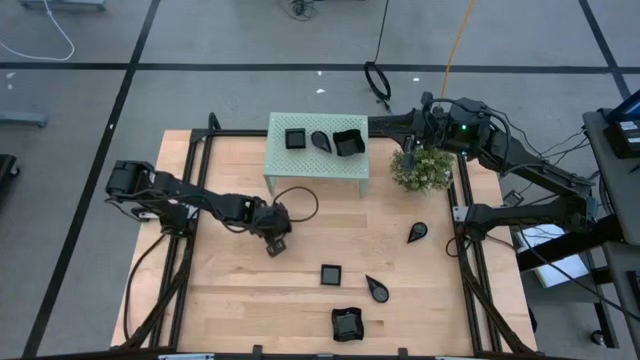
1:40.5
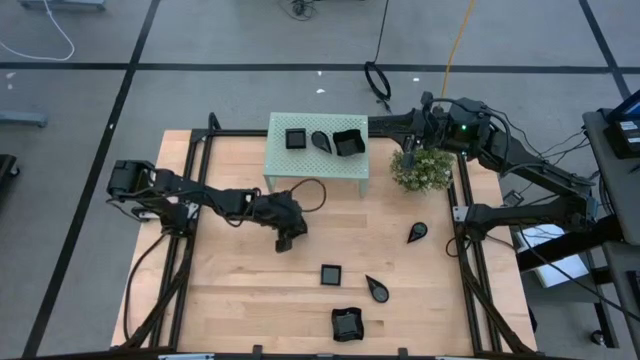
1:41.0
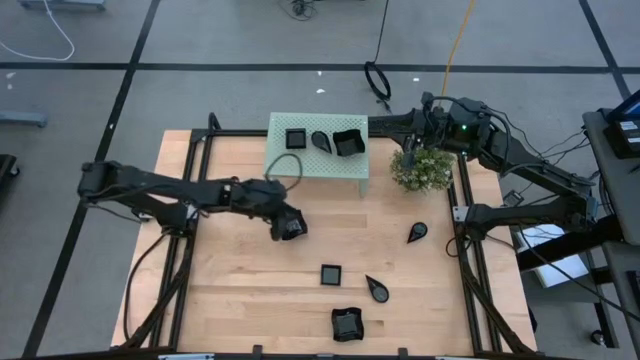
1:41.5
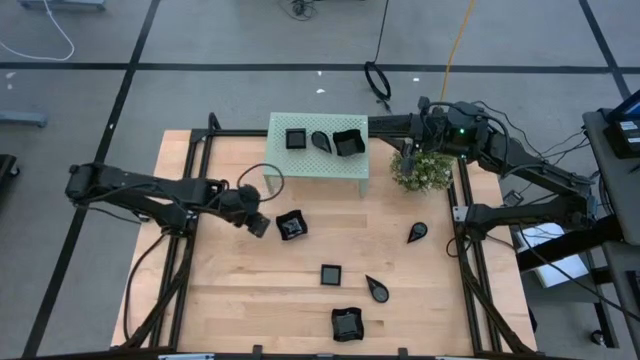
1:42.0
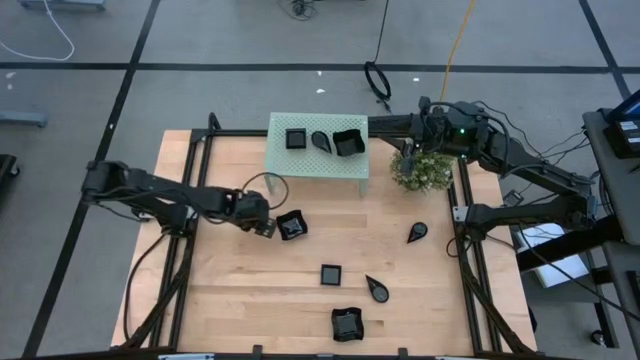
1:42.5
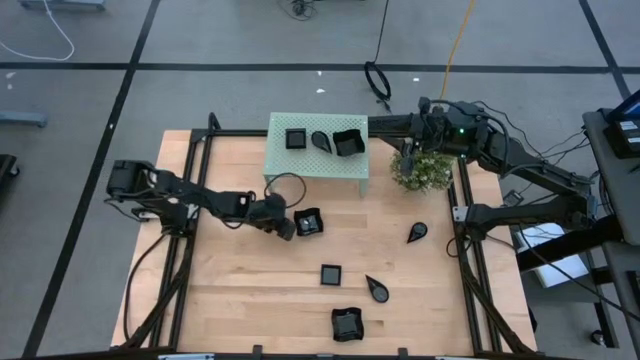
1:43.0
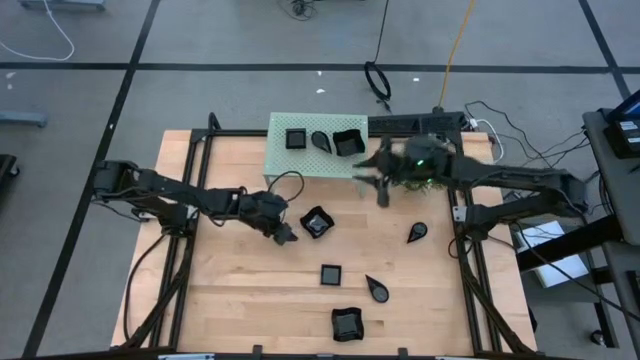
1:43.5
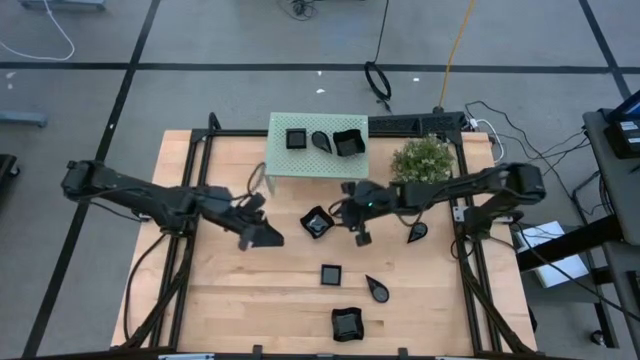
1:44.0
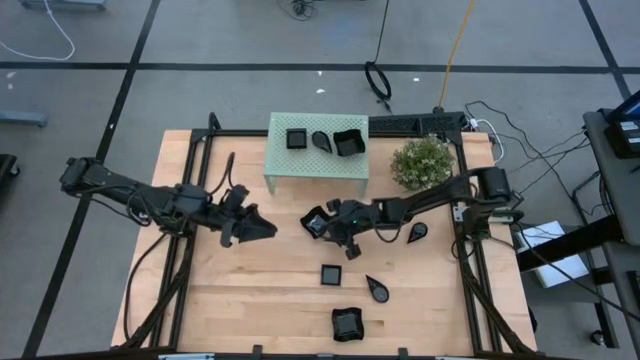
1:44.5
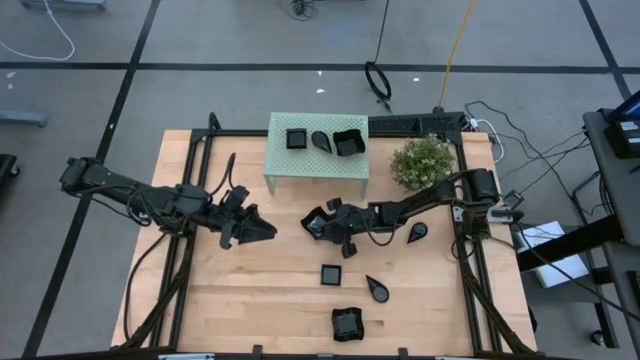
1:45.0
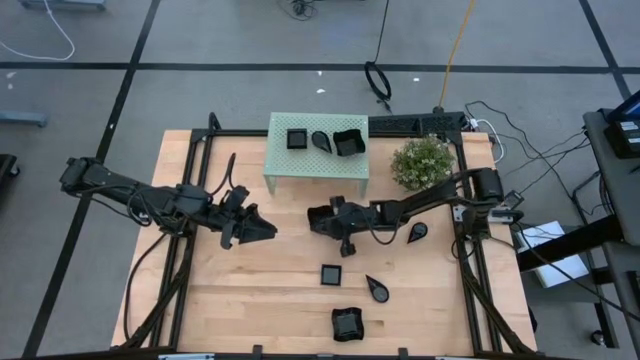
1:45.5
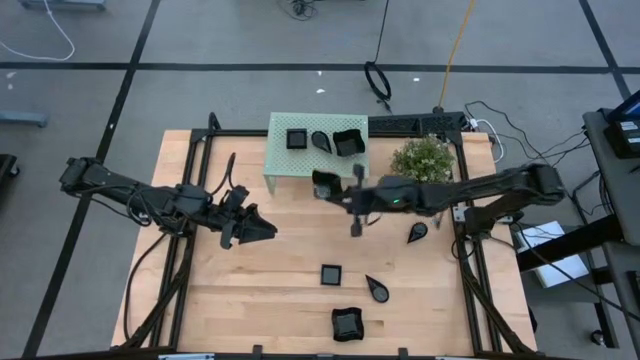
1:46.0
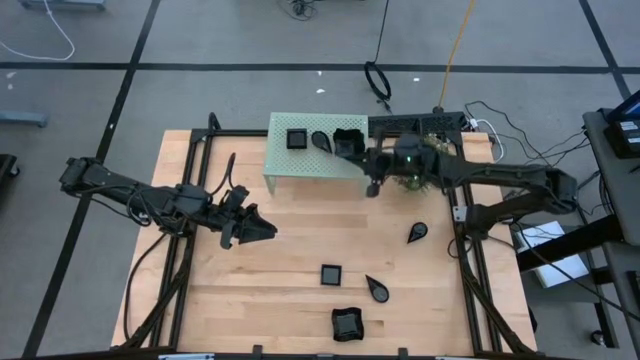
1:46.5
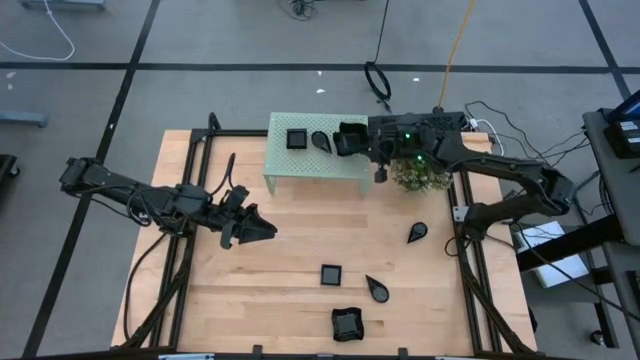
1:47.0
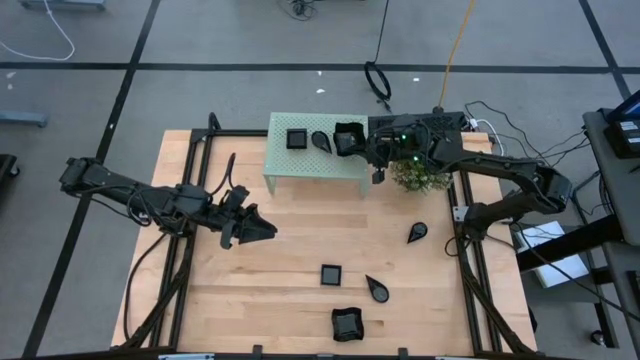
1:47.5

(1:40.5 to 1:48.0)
Task: Pick & Place Mini shaped plates
Stack the black distorted square plate on top of the other black distorted square plate on the shelf

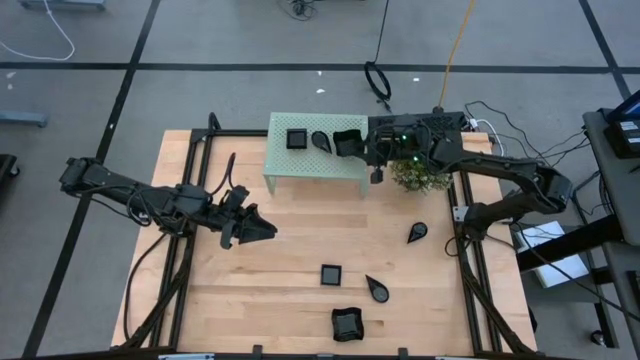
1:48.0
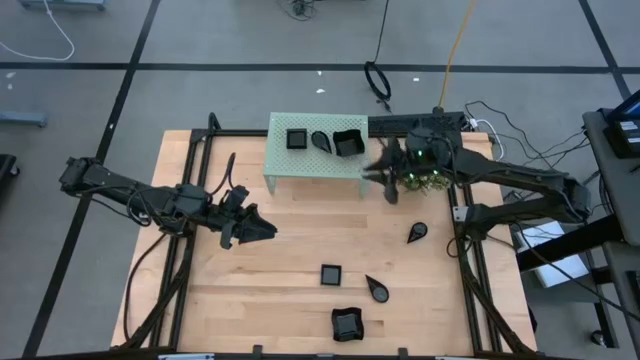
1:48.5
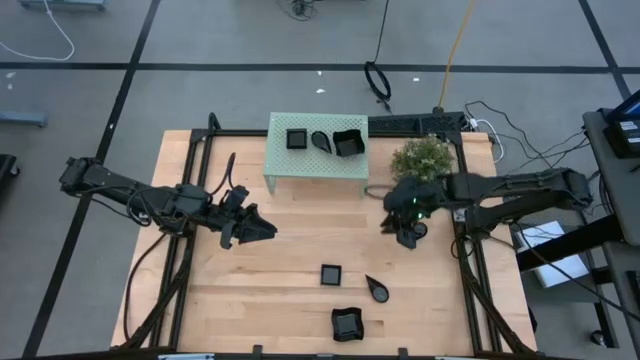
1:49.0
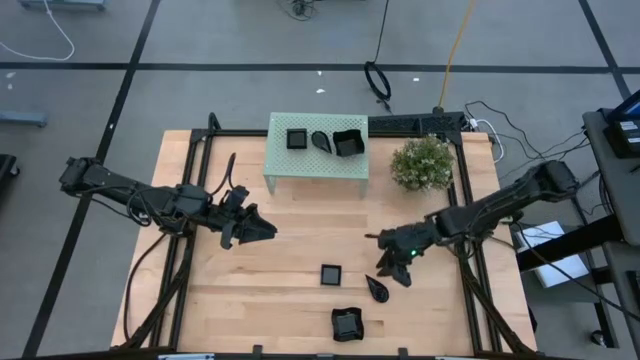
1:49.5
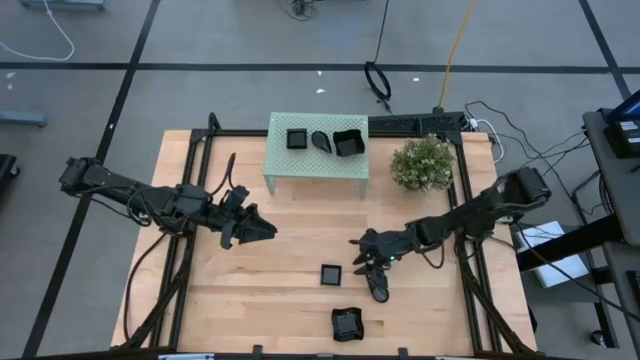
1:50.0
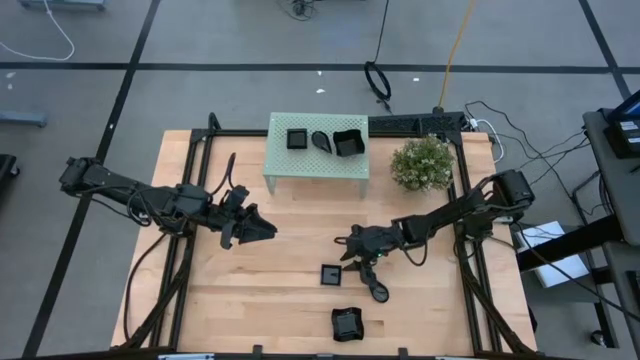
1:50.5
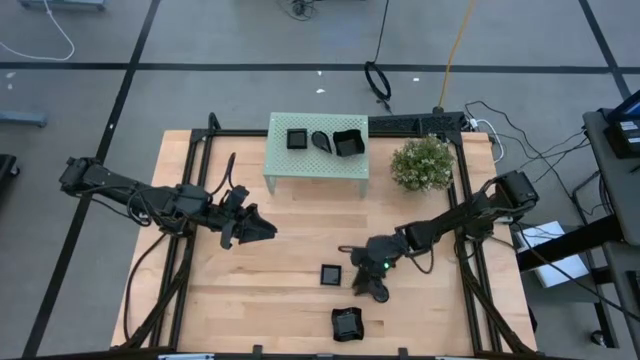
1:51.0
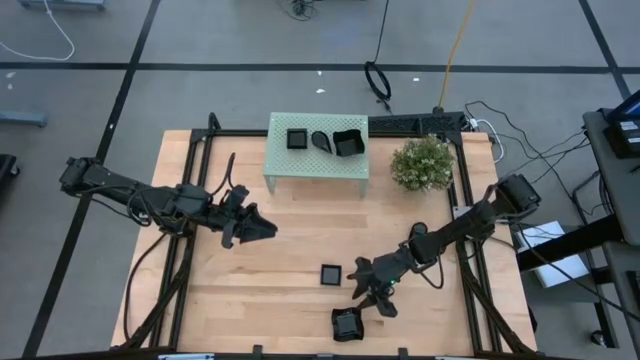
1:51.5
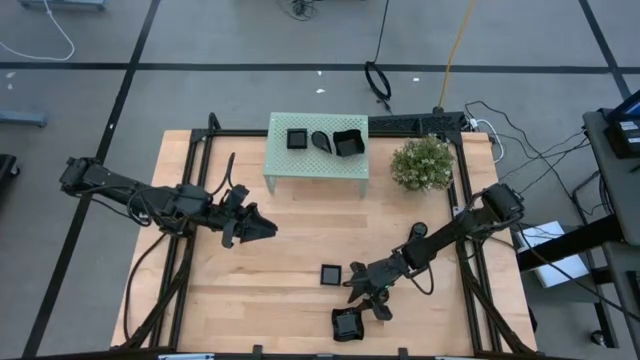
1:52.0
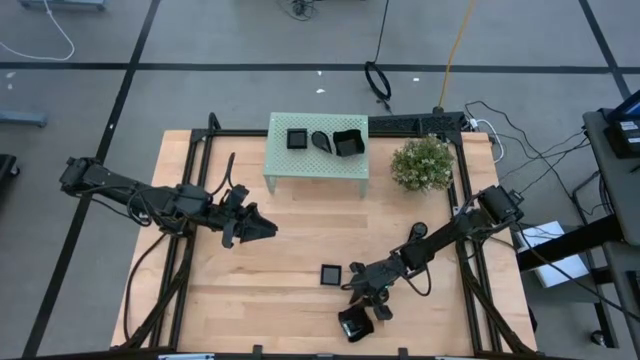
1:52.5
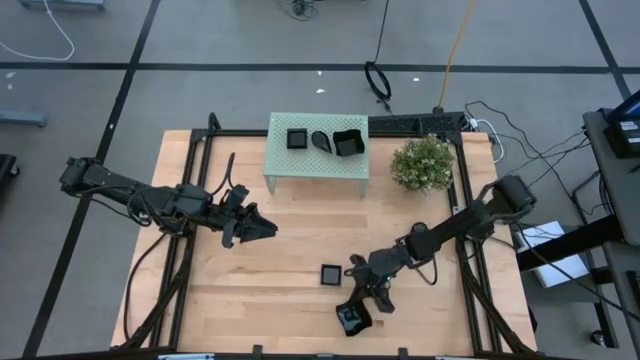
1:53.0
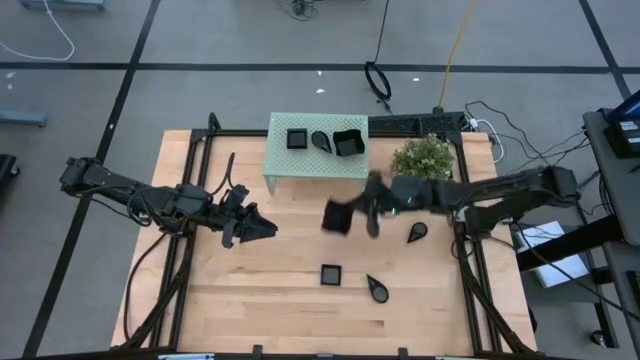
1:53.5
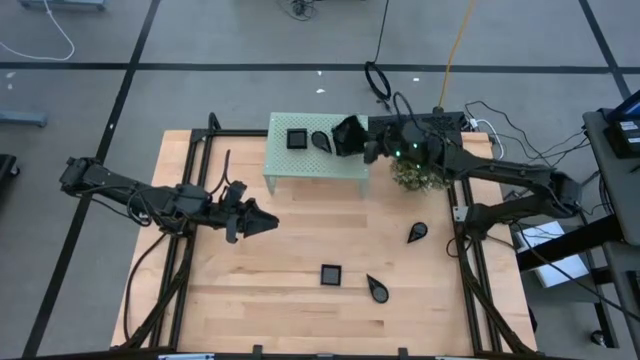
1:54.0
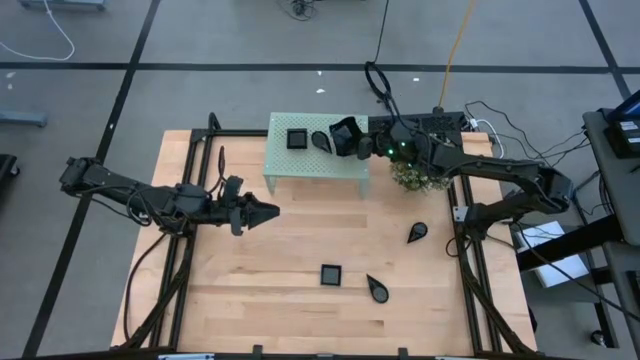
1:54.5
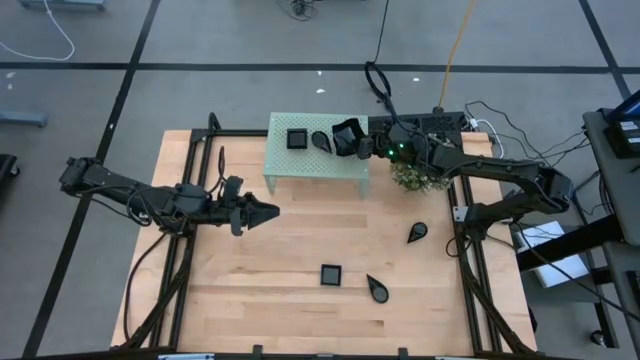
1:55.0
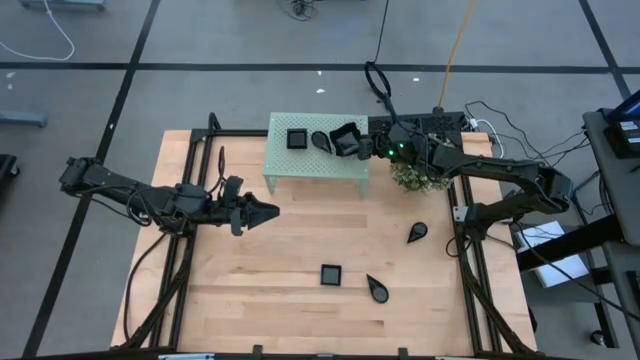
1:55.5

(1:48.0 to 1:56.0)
Stack the black distorted square plate on top of the other black distorted square plate on the shelf

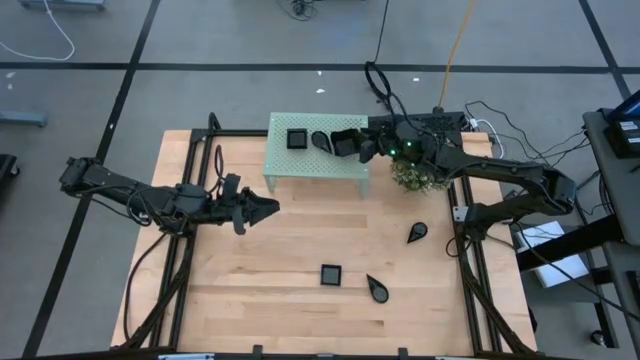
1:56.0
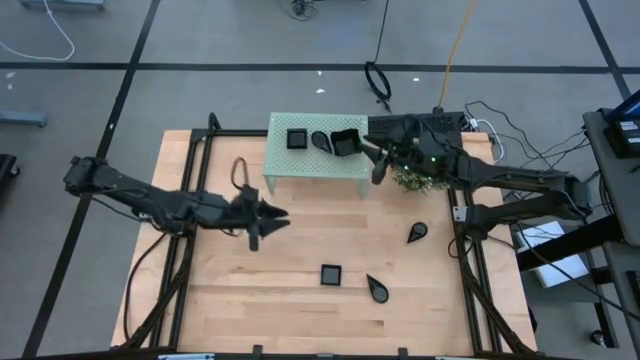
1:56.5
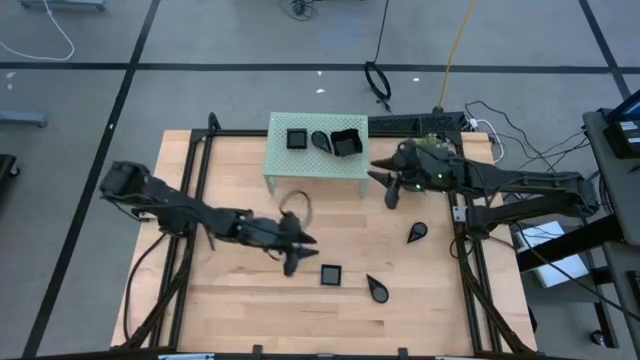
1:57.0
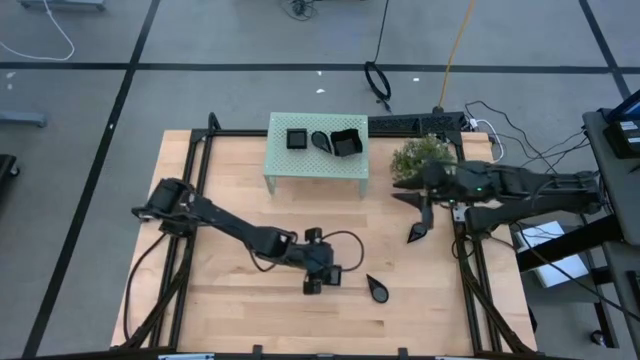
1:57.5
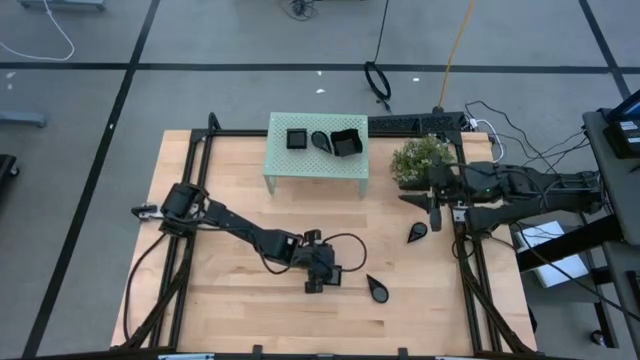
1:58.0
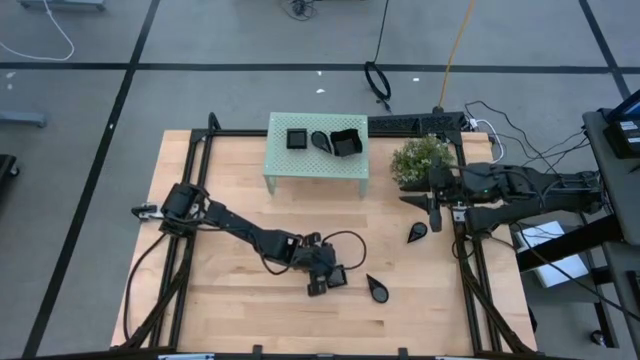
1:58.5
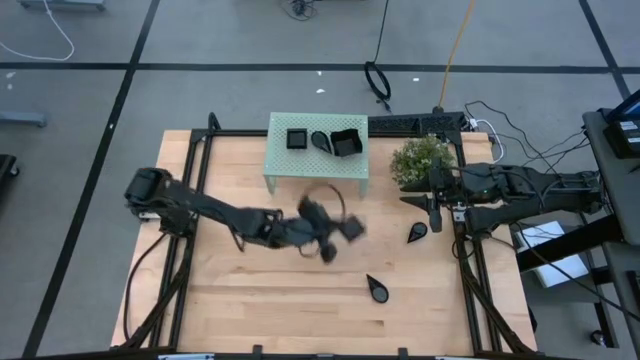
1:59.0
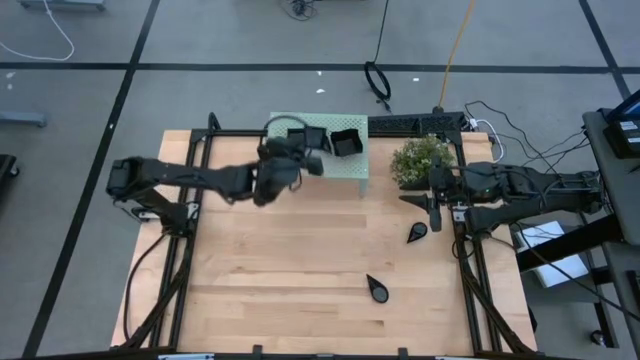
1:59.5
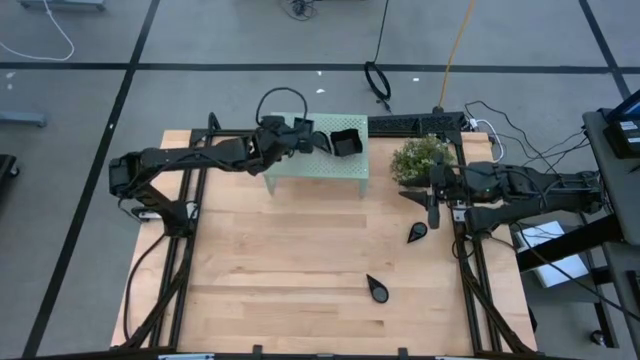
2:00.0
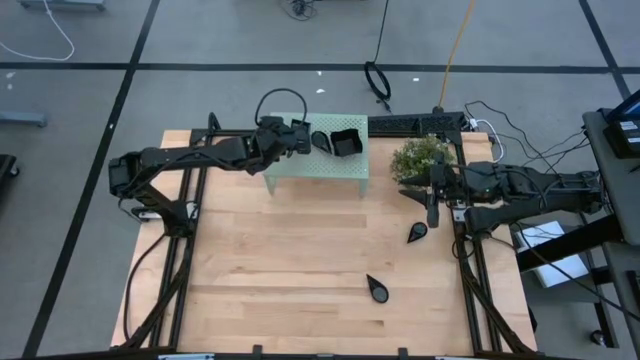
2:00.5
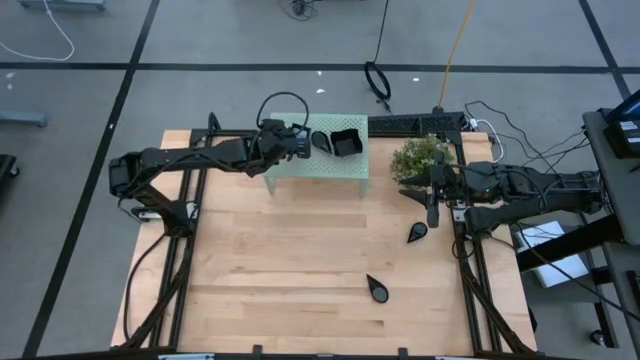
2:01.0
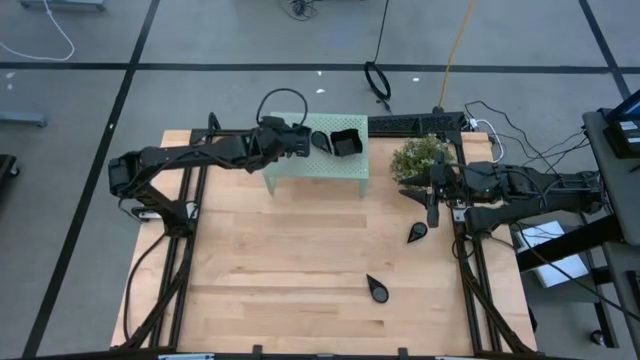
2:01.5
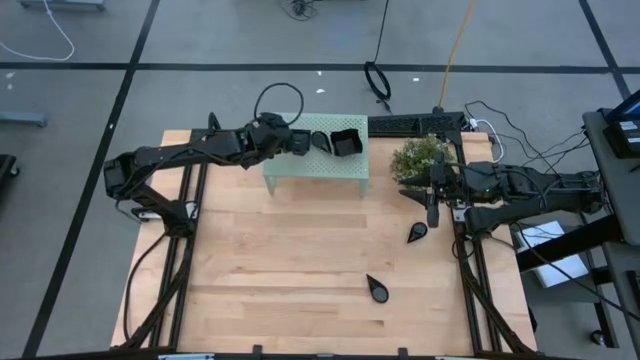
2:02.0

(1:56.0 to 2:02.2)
Stack the black square plate on top of the other black square plate on the shelf
